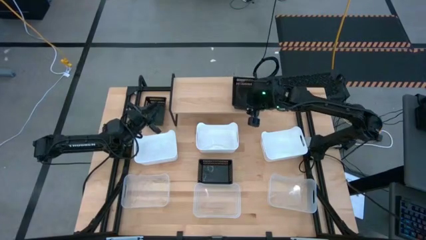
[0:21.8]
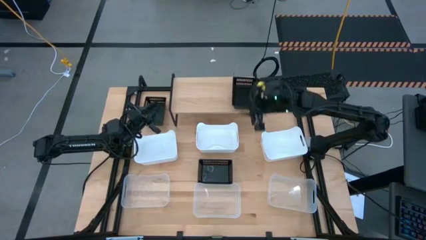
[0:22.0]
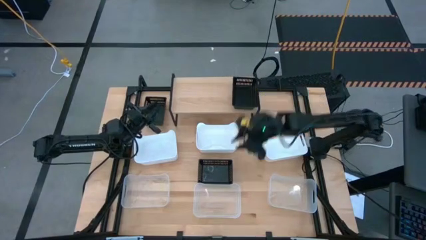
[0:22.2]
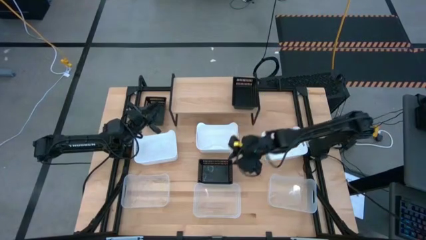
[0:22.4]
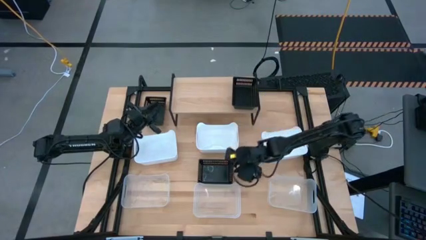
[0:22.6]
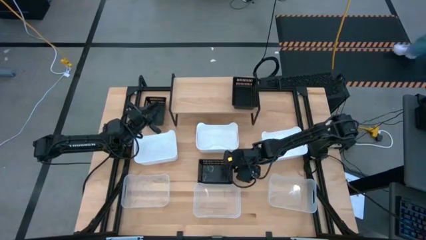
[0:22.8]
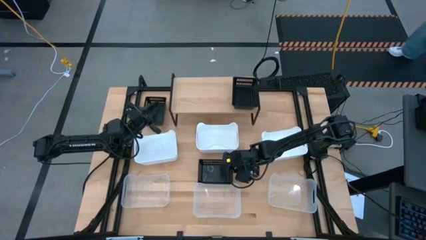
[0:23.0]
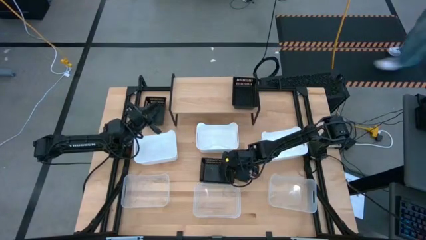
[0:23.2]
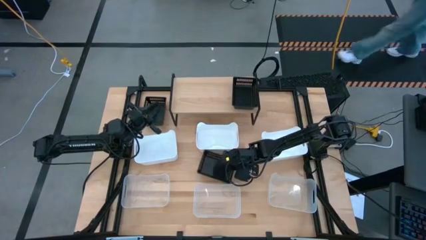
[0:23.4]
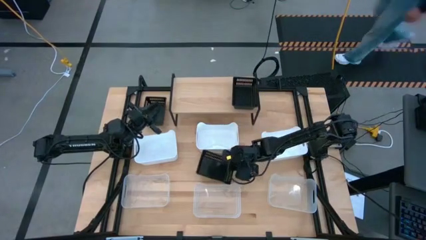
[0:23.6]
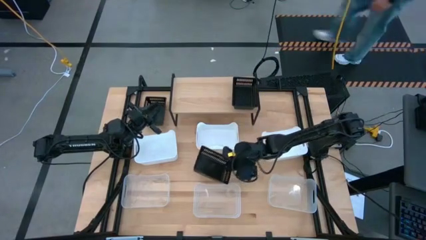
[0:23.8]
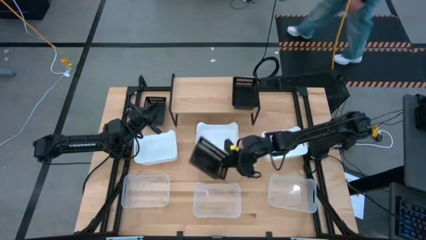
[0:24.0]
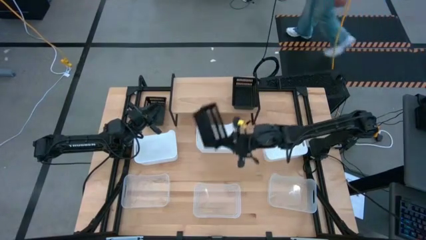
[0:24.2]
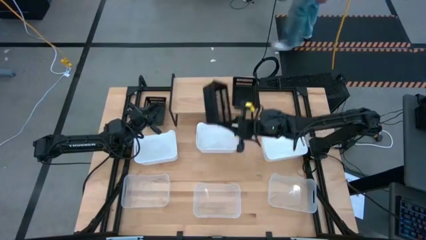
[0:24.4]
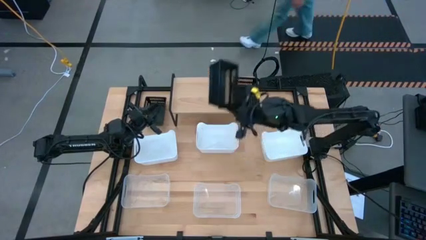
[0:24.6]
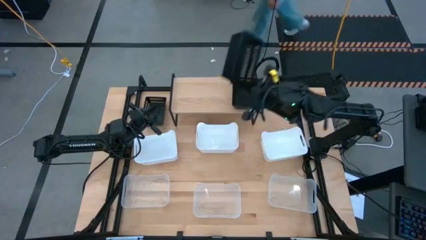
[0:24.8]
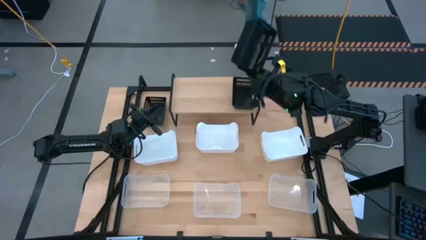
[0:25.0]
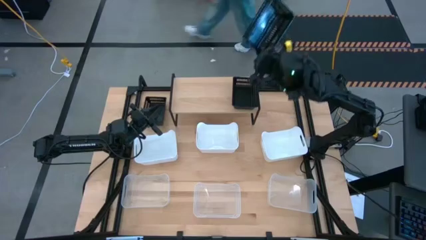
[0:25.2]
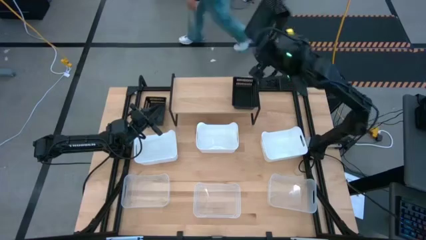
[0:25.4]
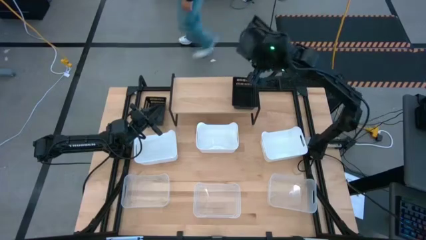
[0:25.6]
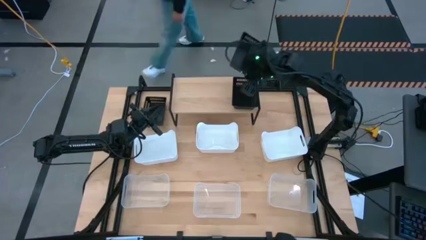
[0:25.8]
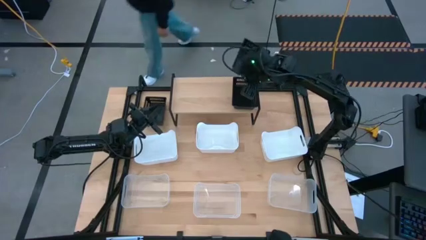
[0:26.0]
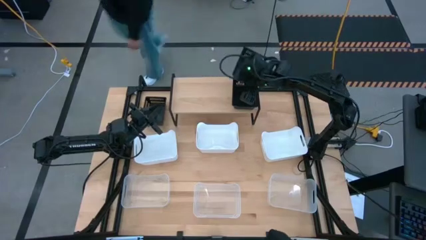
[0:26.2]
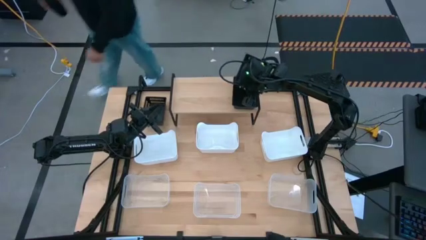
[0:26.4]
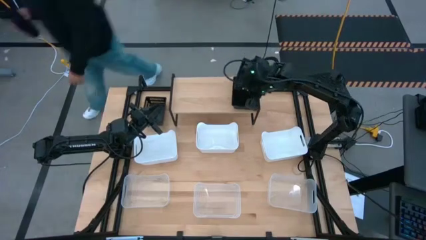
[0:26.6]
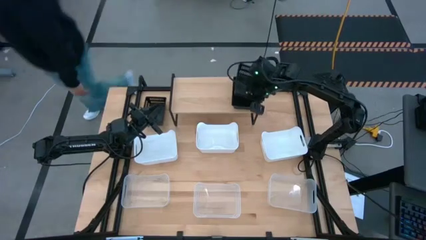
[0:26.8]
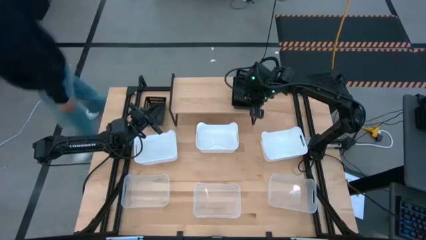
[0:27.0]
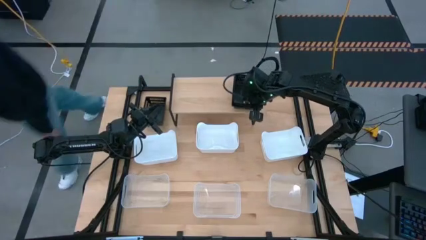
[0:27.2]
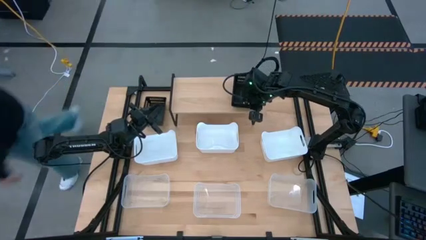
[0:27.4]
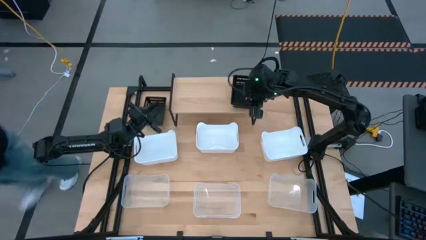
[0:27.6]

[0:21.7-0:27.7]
Task: Stack baskets on shelf by color
Stack the bottom black bin on top of the black bin on the shelf

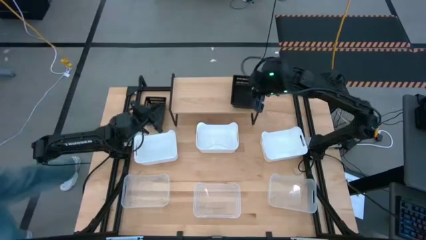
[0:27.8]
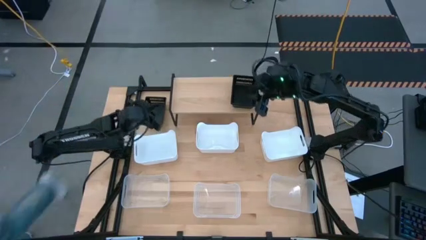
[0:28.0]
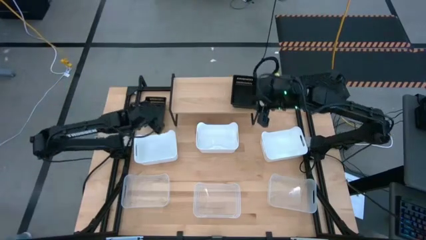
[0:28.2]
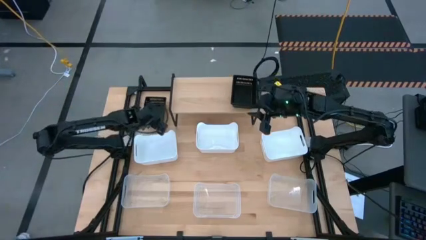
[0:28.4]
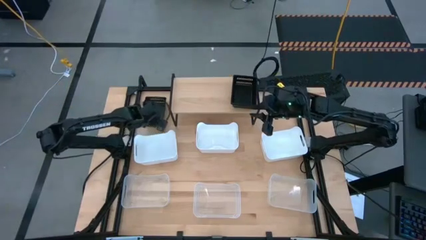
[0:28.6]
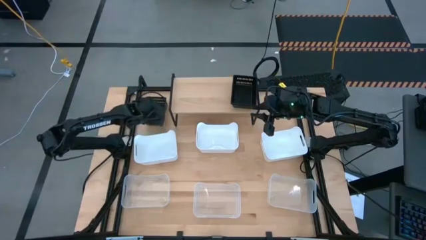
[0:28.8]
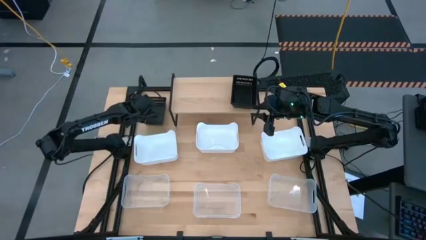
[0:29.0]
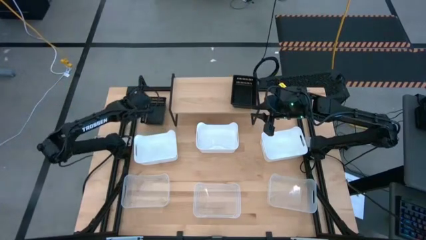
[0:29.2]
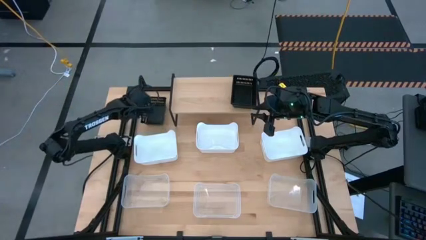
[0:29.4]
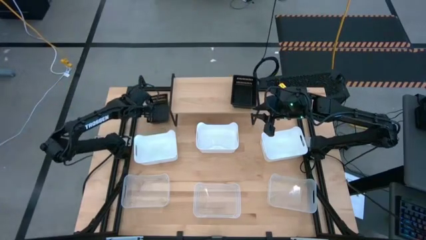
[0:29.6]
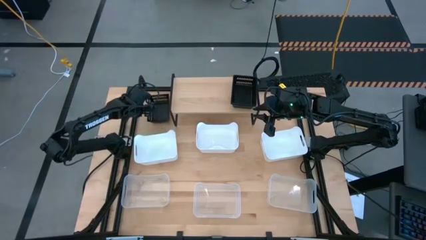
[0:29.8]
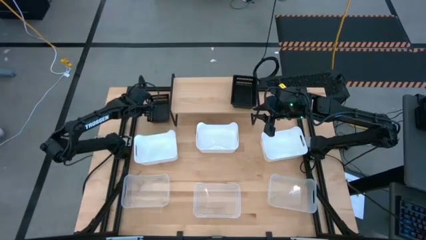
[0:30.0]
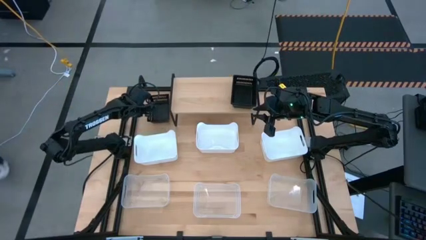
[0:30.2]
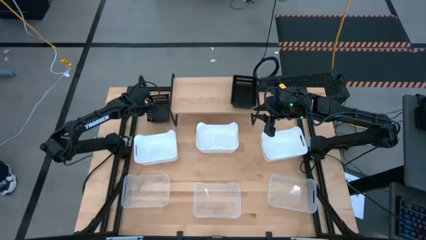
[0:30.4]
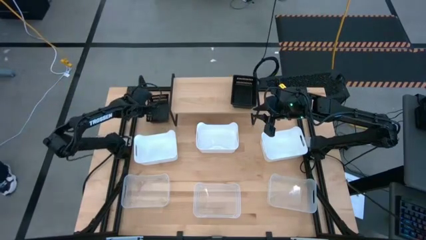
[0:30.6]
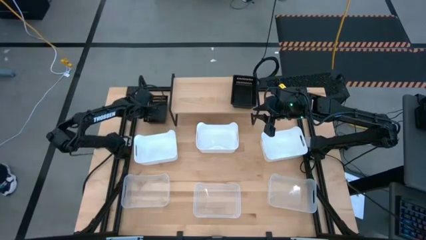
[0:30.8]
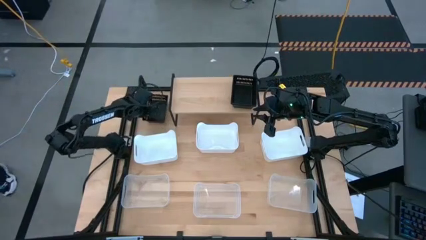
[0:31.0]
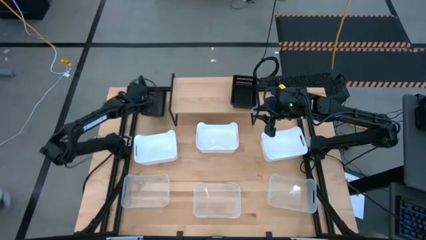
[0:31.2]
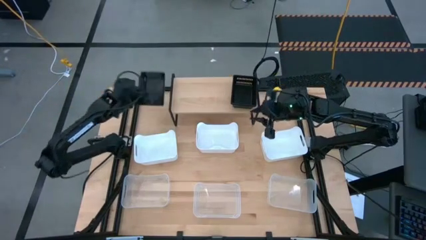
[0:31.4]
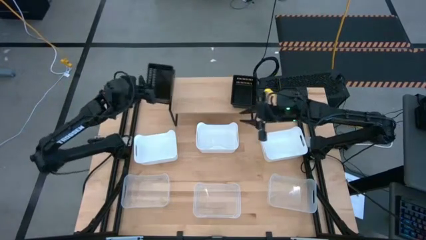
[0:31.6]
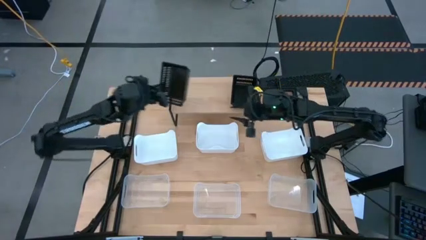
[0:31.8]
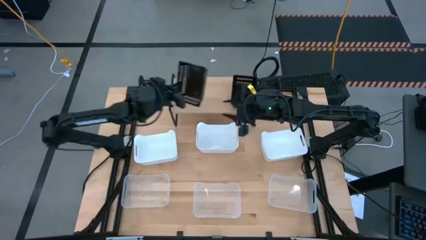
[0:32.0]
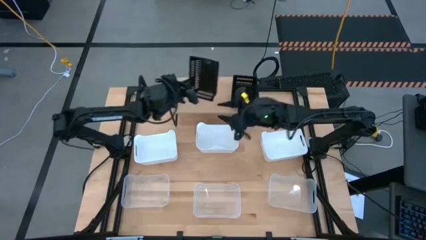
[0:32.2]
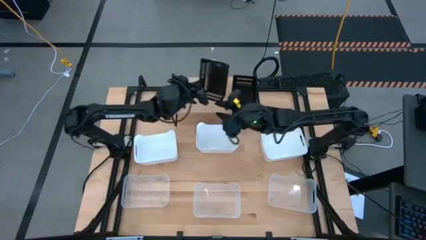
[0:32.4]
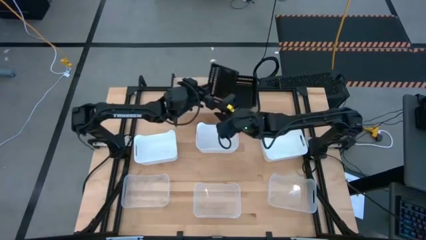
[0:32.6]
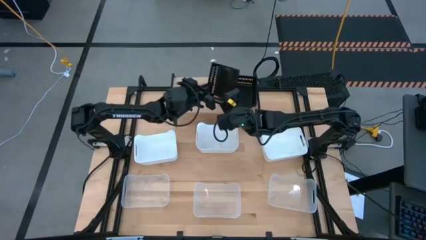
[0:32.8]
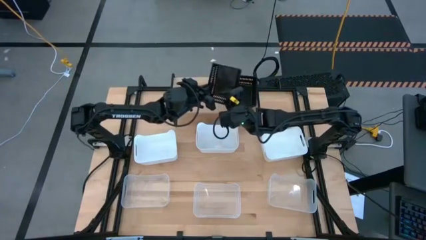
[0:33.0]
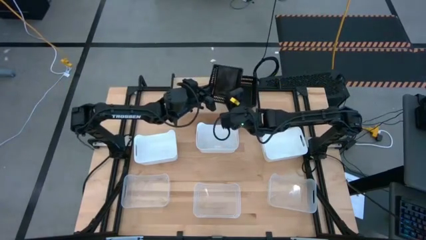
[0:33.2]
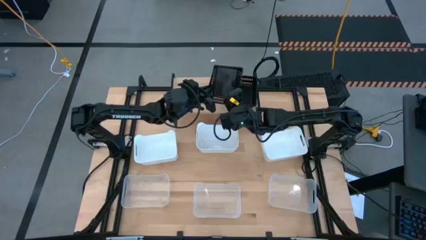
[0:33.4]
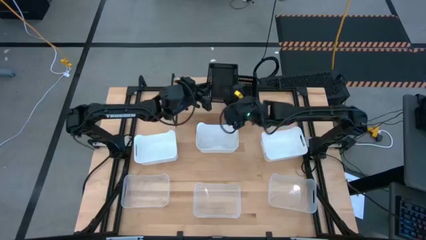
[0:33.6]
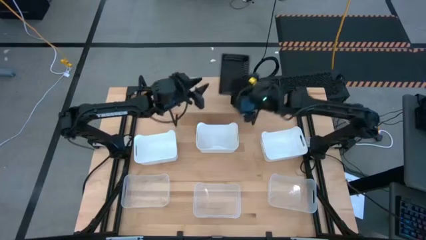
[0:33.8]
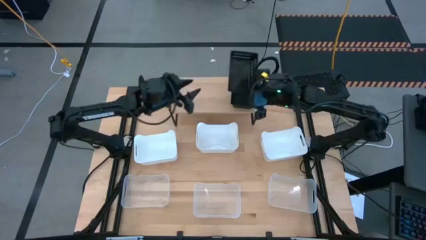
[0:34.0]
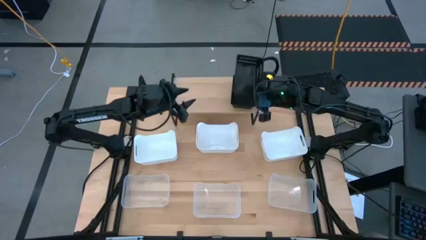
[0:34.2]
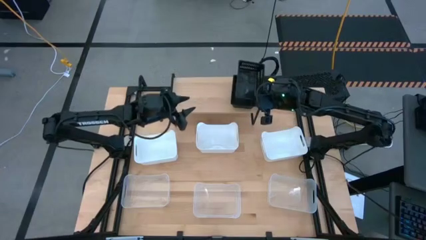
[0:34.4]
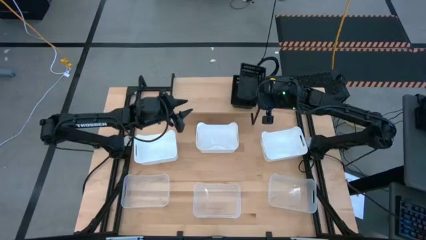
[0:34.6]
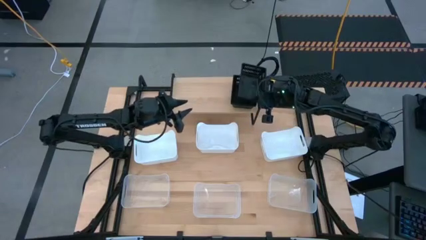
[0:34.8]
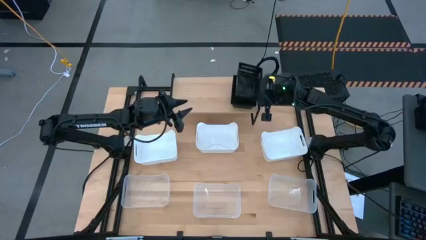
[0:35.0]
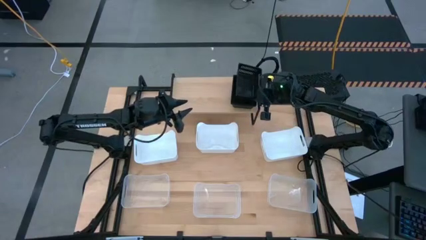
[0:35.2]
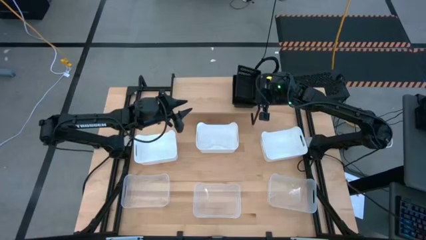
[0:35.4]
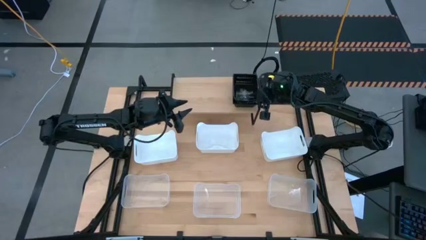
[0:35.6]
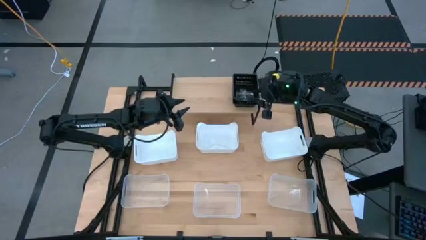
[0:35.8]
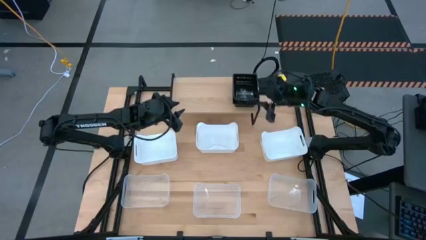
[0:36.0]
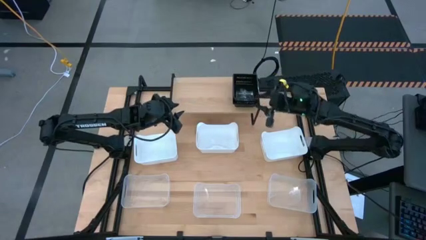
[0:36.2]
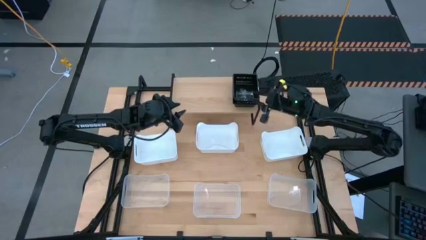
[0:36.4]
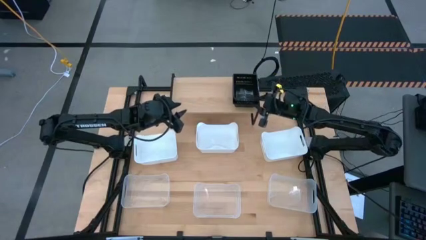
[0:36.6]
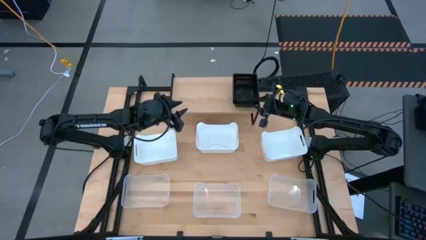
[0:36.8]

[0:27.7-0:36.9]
Stack the black bin on top of the stacked black bins on the shelf
